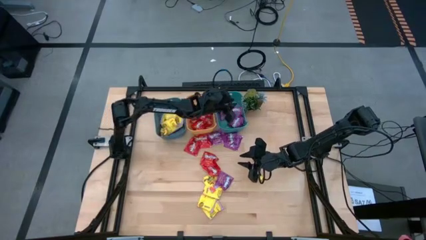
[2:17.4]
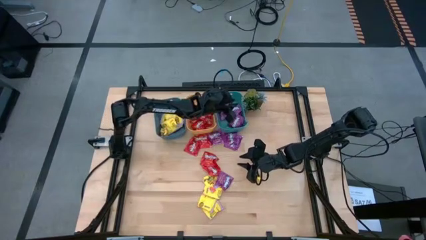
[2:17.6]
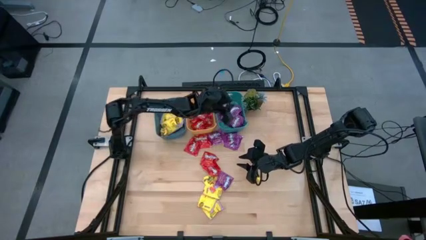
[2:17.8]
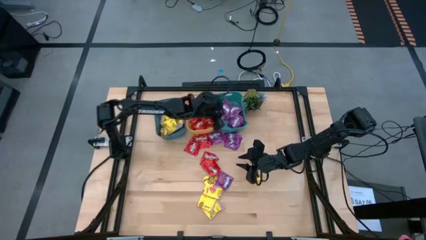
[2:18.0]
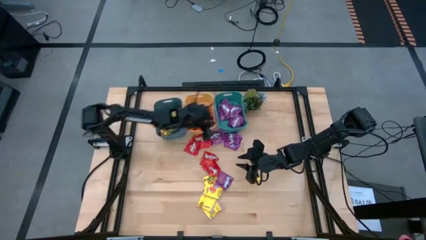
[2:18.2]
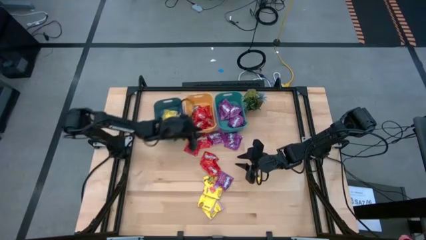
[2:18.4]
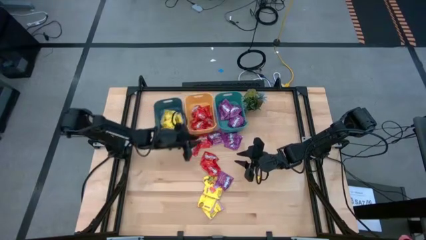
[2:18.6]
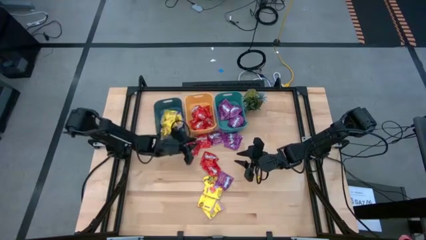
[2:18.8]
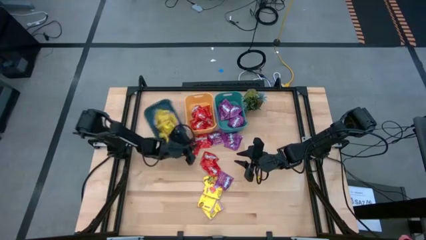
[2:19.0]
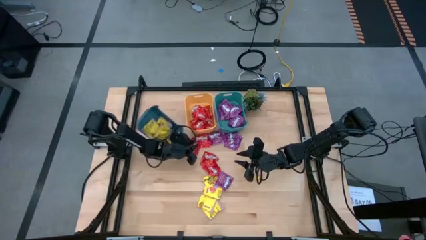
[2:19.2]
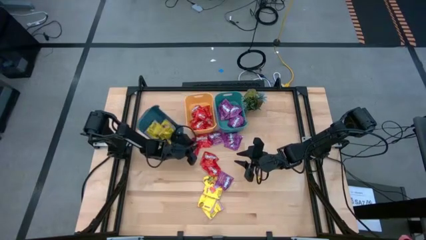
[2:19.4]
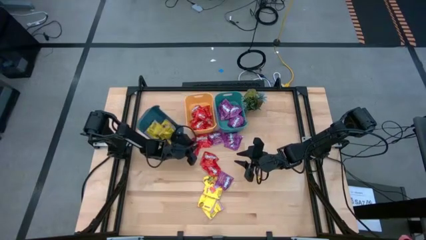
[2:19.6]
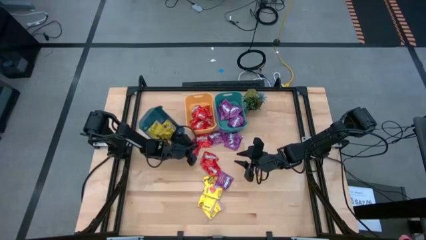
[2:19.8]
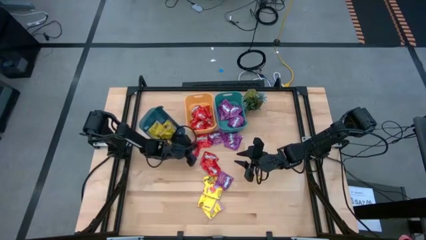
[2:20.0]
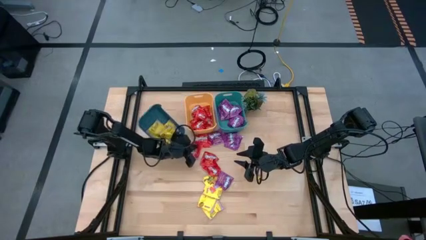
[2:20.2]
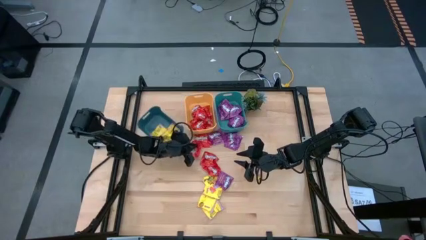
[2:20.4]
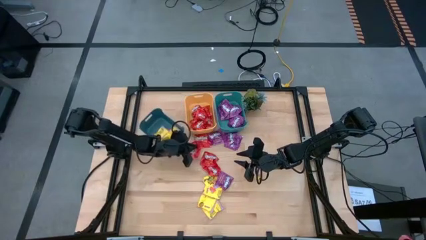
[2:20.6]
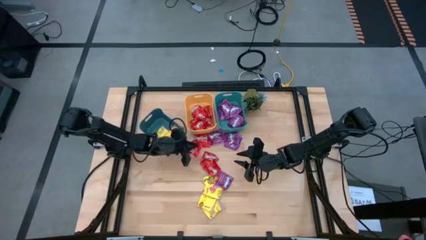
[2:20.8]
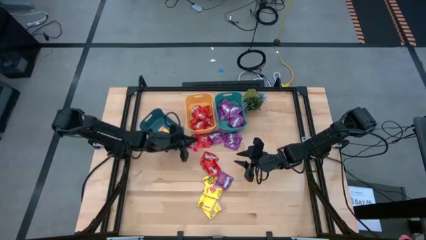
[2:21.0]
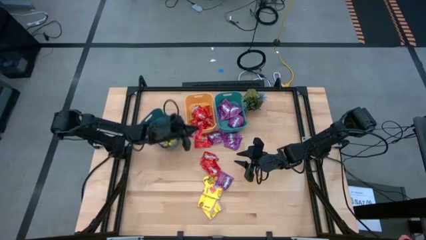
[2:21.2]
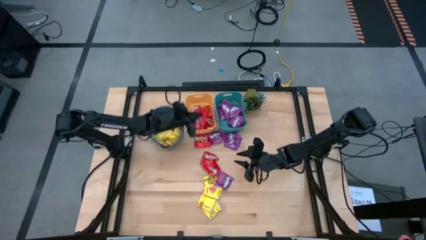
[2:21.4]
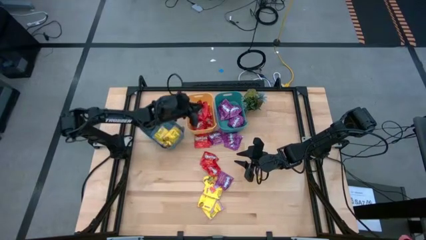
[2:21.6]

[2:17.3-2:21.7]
Task: Sort candy
Put the red candy into the yellow bin

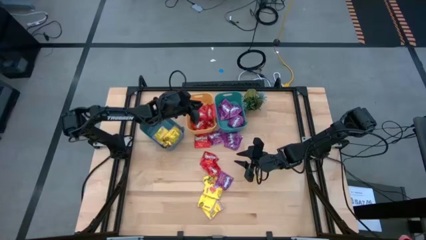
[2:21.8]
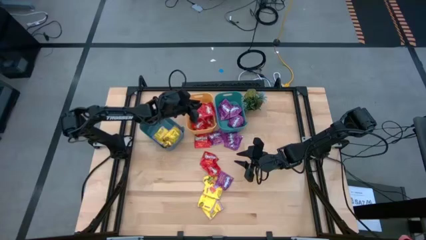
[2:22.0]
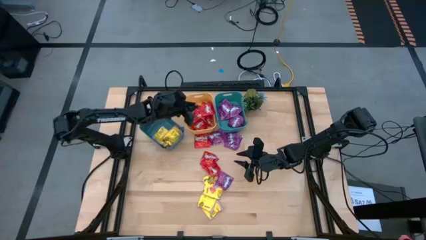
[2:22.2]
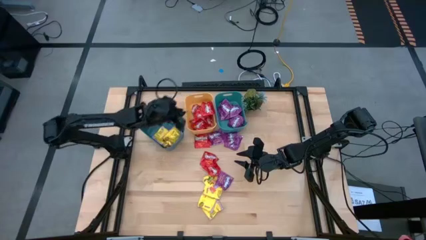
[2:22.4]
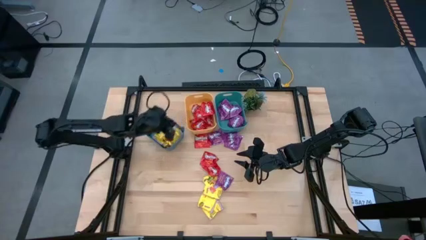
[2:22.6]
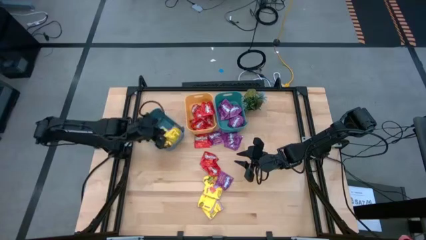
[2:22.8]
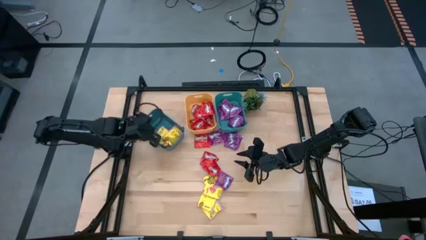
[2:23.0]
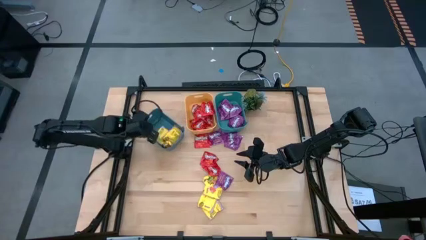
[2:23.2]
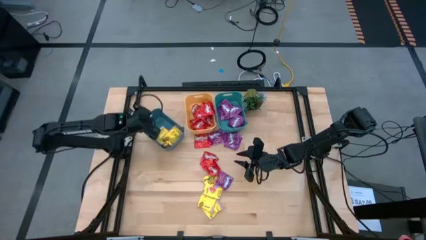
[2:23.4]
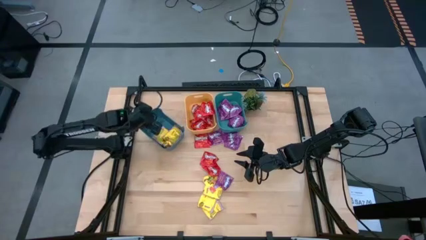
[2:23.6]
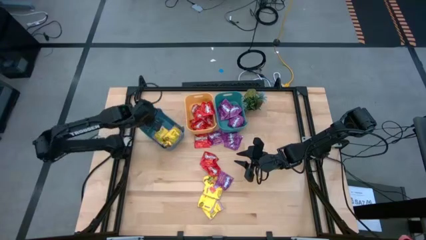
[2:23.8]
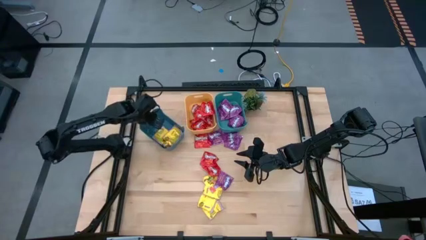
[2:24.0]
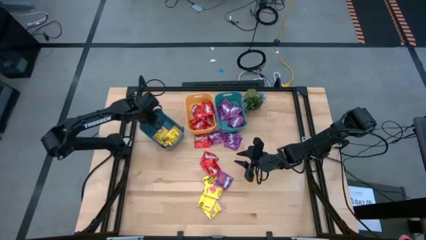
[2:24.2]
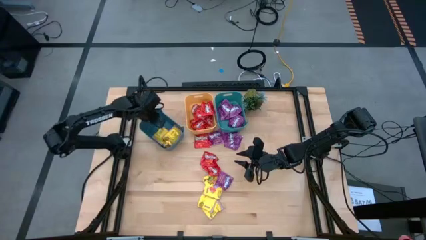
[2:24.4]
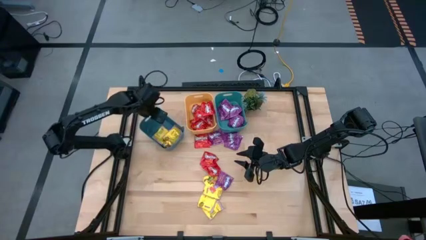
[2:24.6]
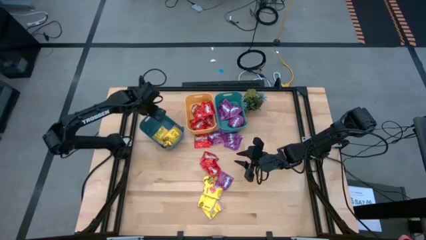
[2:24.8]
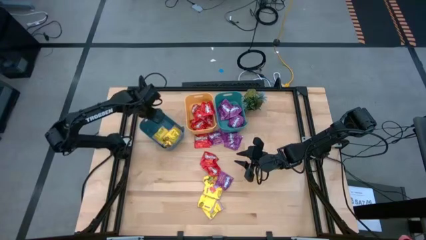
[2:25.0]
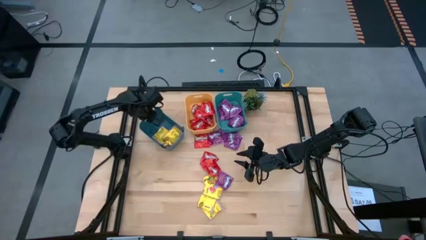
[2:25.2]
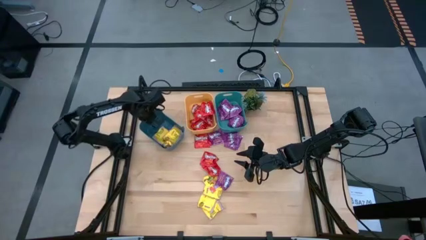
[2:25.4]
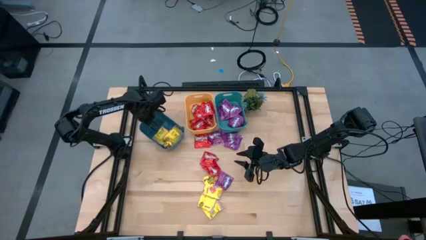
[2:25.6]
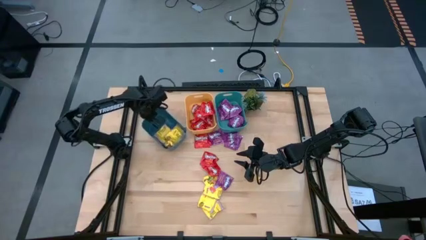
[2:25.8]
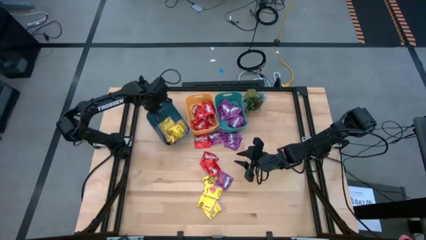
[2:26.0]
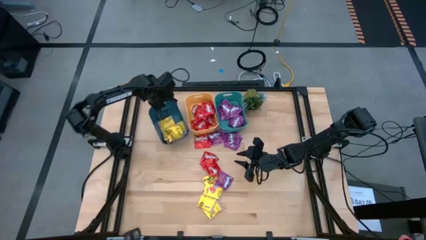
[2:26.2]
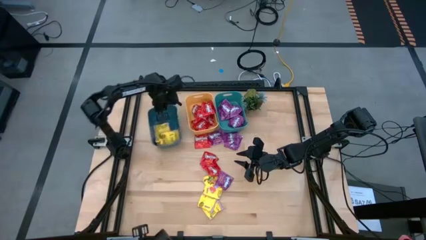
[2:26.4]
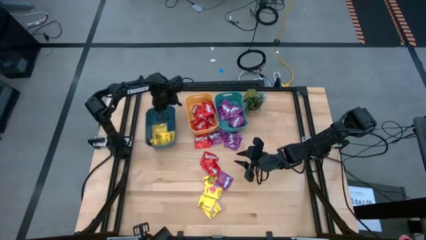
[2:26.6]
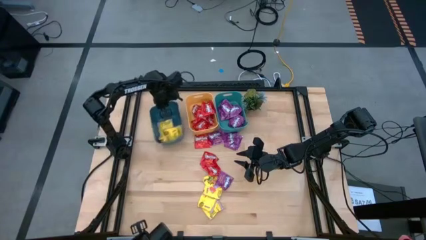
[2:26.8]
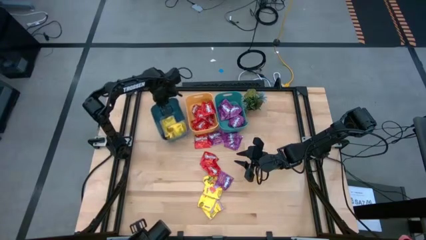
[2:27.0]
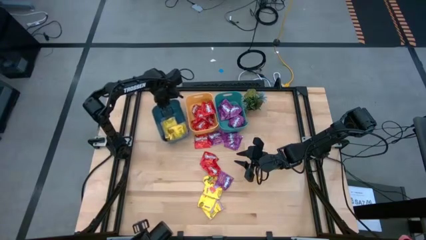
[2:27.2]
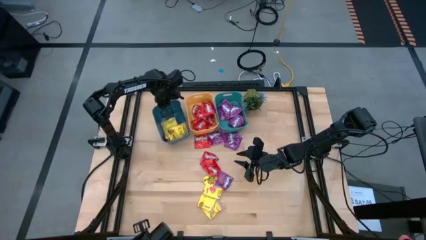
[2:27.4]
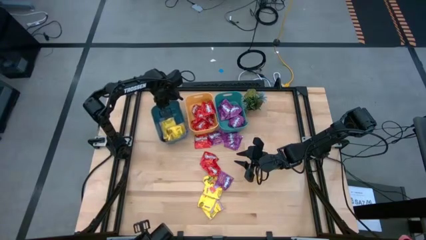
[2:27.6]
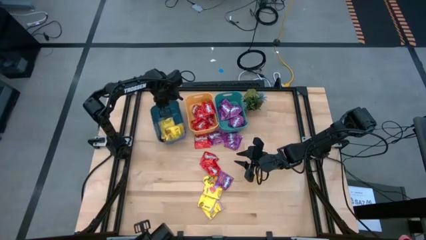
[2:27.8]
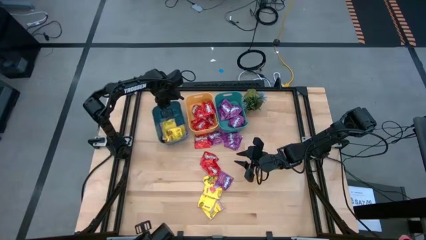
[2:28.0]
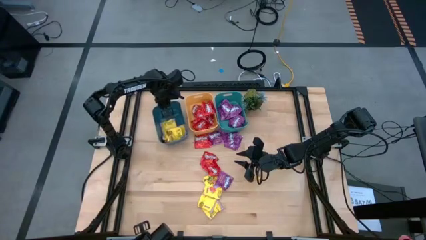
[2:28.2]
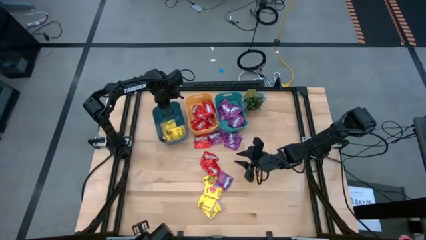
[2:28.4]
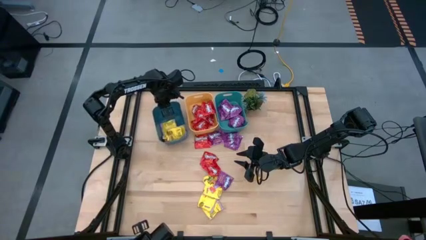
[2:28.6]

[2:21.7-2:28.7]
Adjust the blue bin

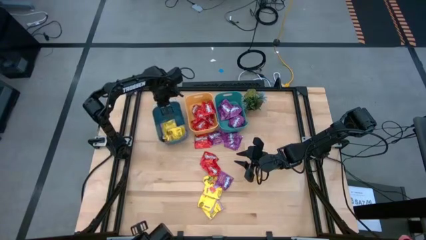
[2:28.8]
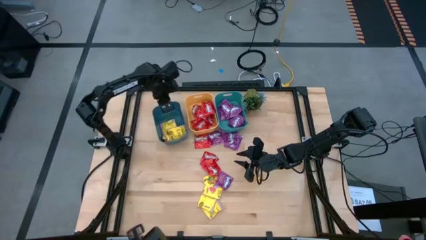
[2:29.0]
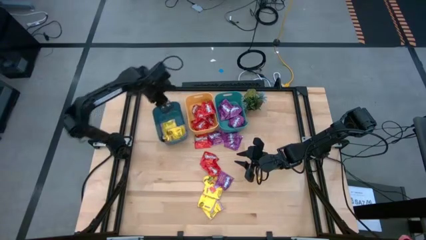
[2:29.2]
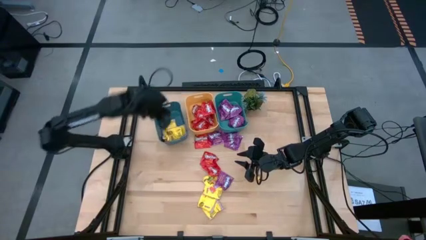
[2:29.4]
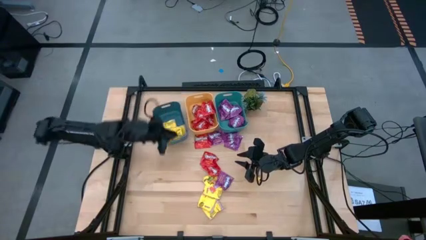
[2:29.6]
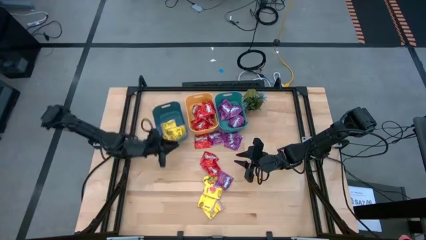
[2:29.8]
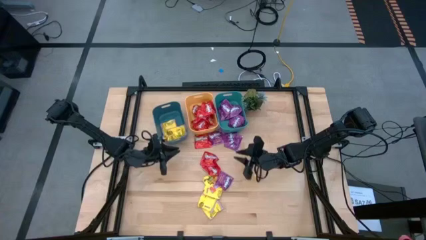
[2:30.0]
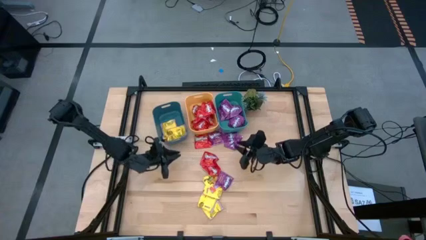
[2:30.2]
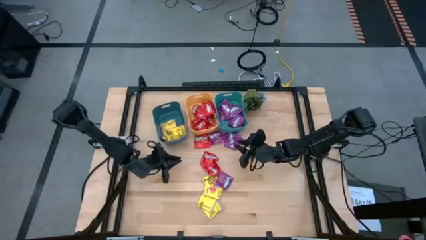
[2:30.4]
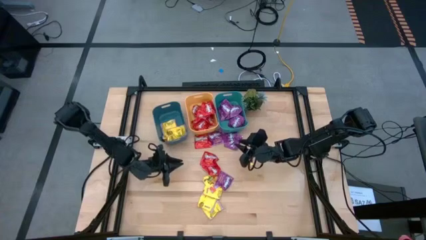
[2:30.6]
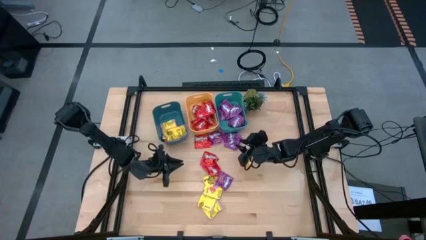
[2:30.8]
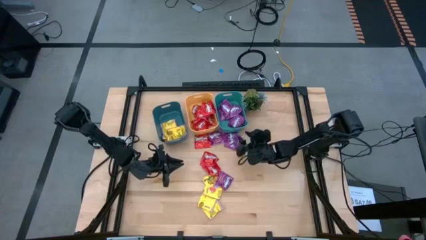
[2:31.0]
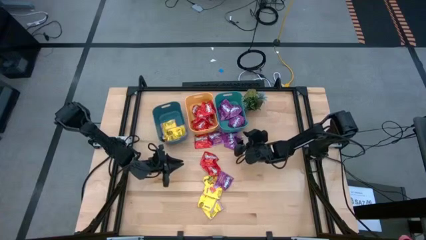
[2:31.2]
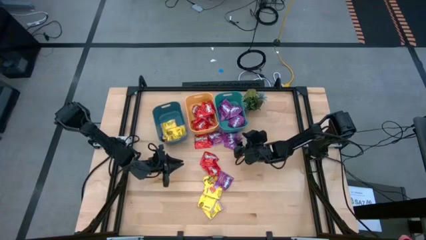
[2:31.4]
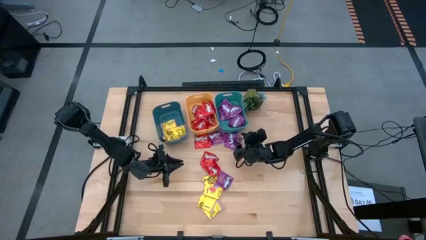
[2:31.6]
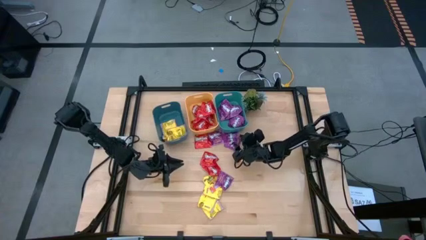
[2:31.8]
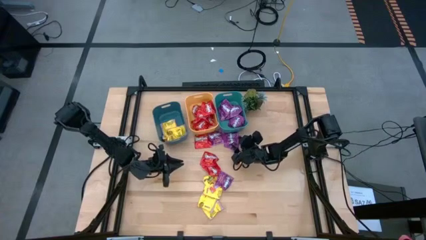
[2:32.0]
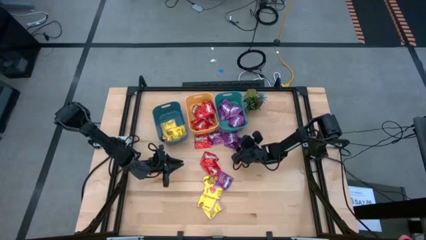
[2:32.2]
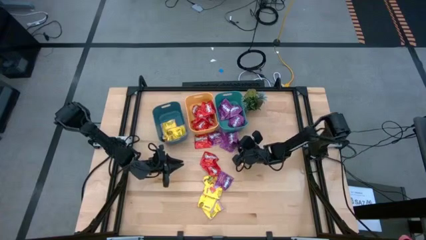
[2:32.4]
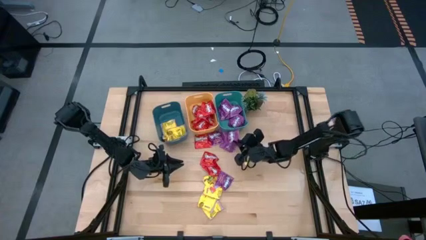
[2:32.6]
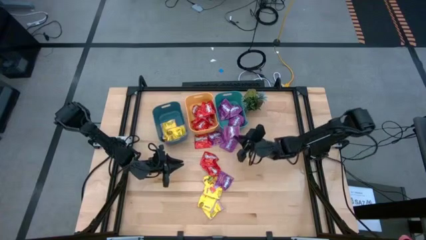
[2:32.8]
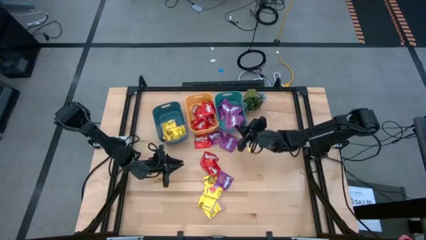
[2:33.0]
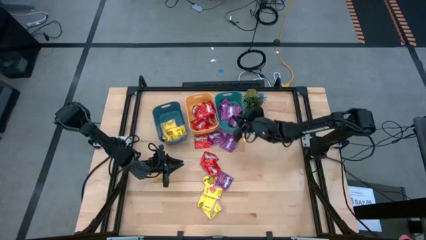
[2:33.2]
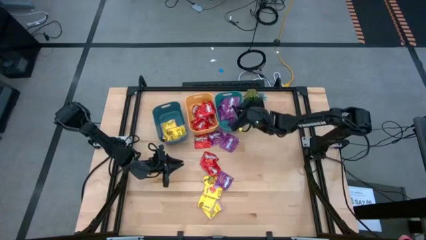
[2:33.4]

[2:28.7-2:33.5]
Put the purple candy into the green bin
